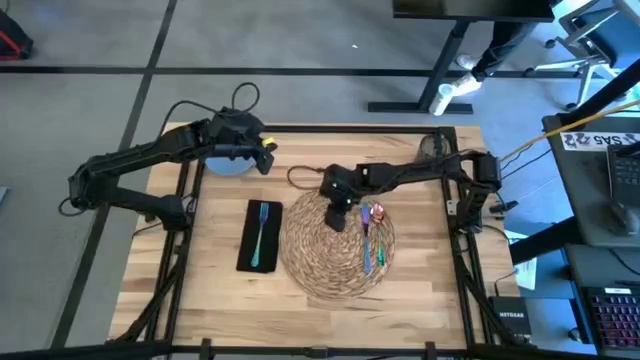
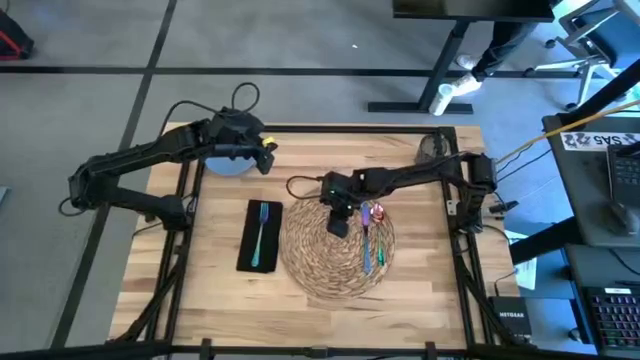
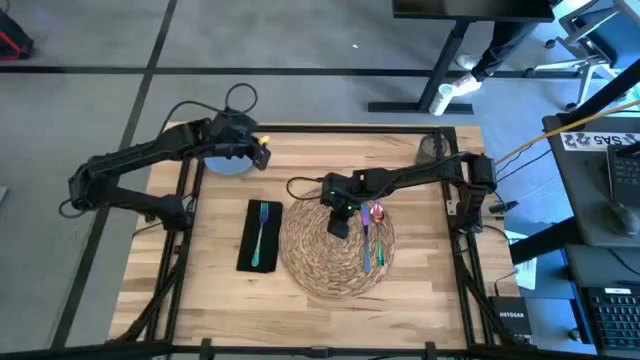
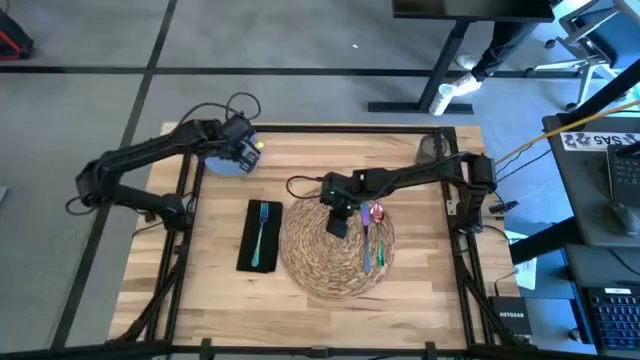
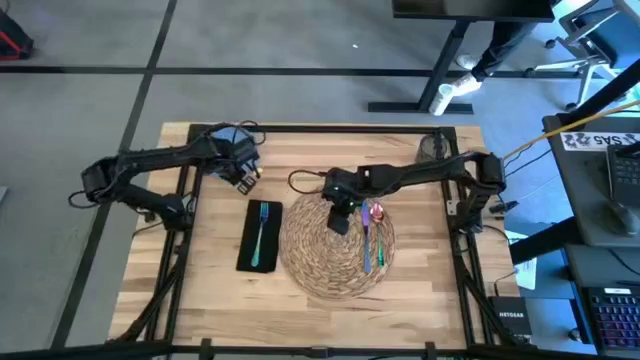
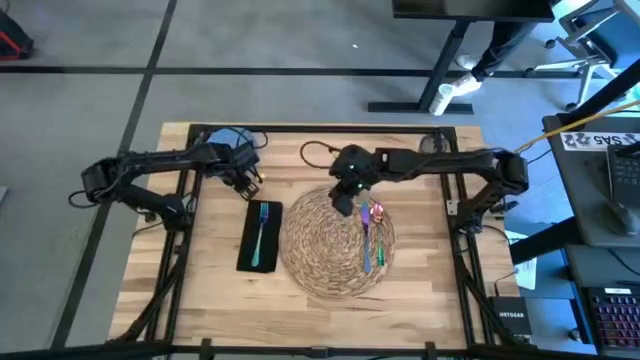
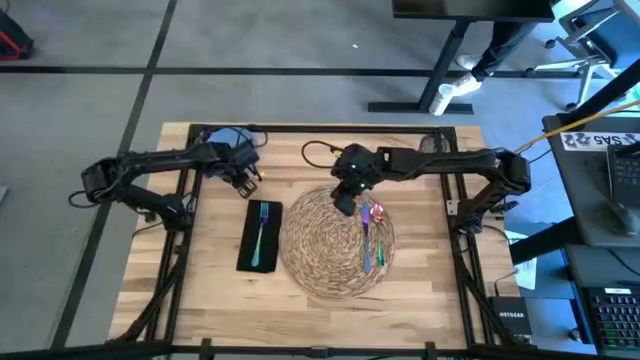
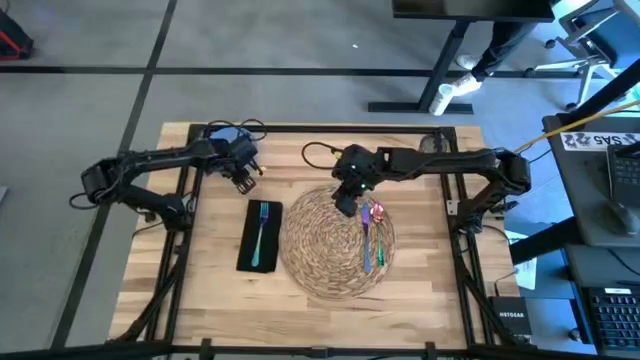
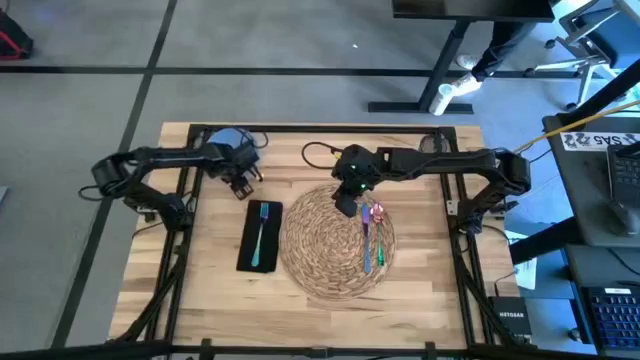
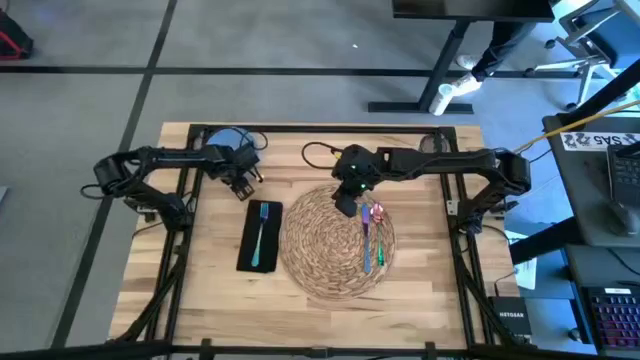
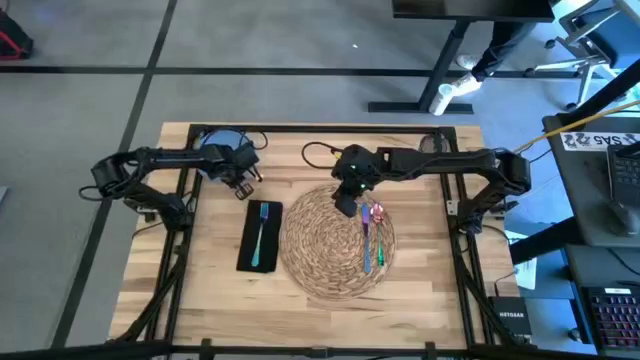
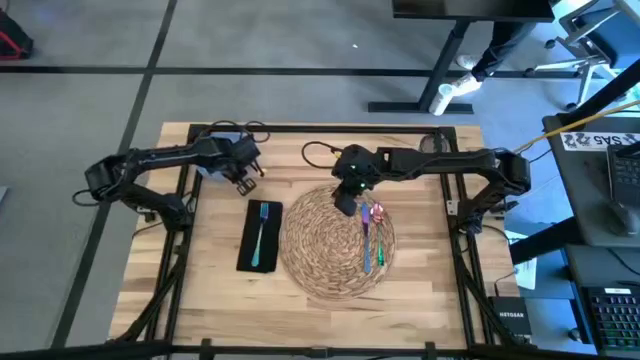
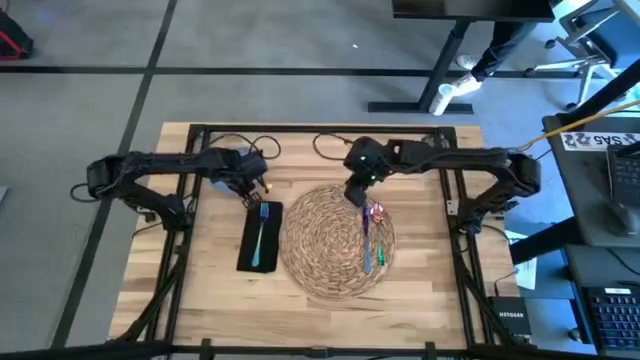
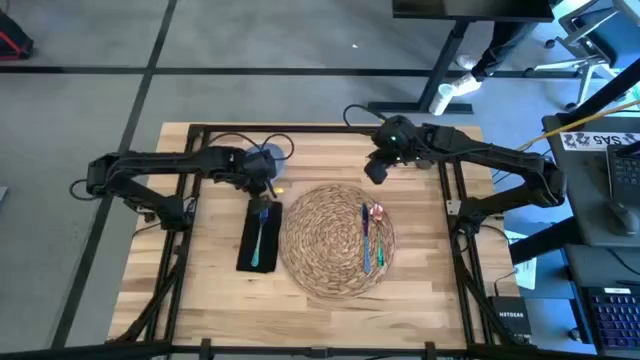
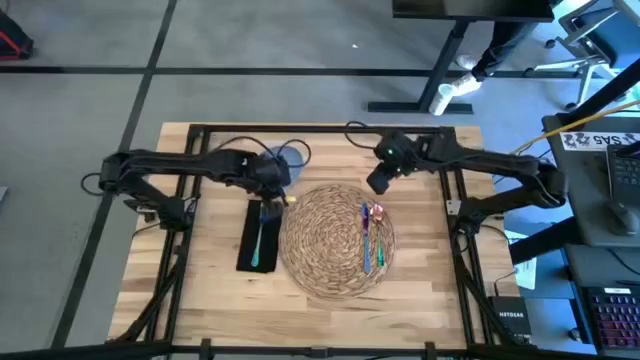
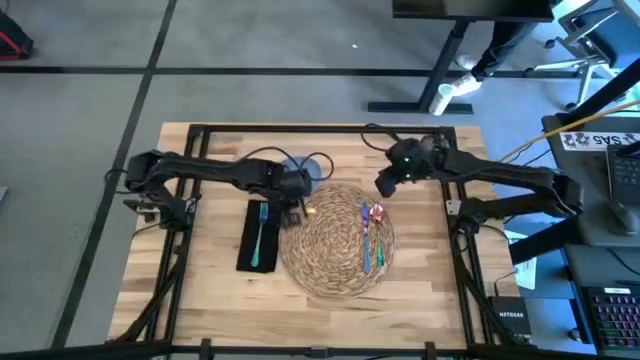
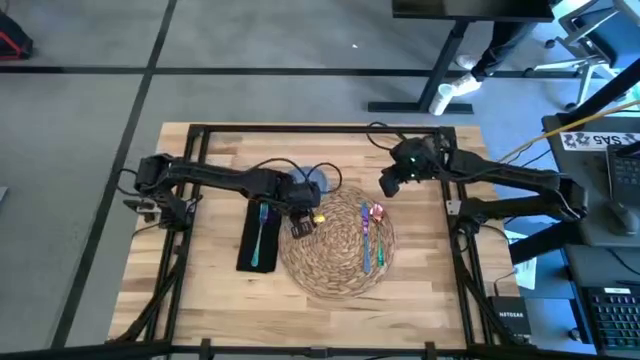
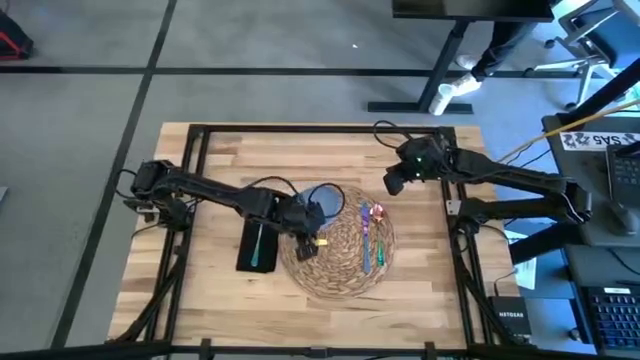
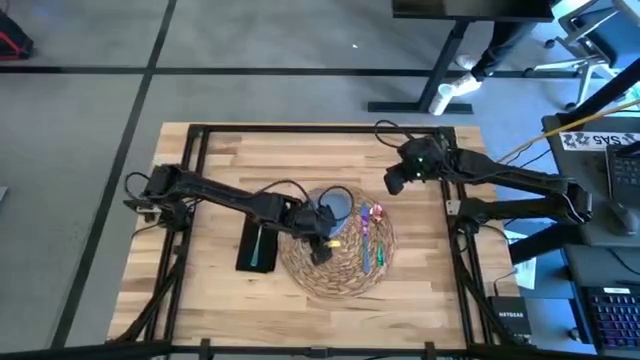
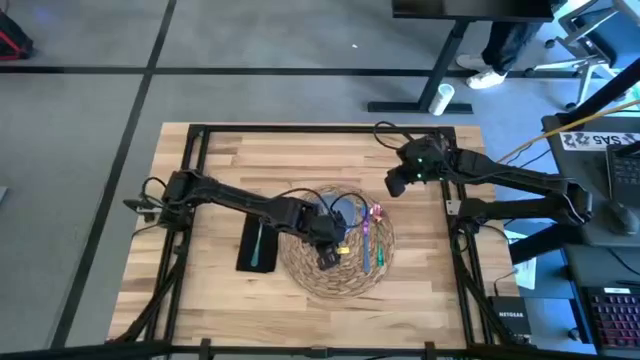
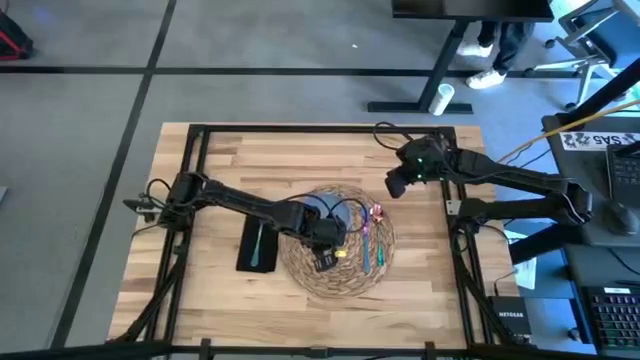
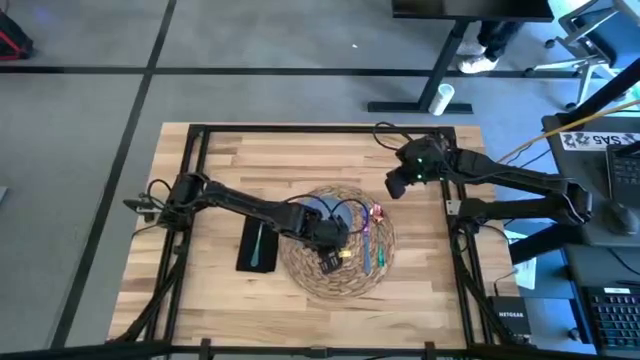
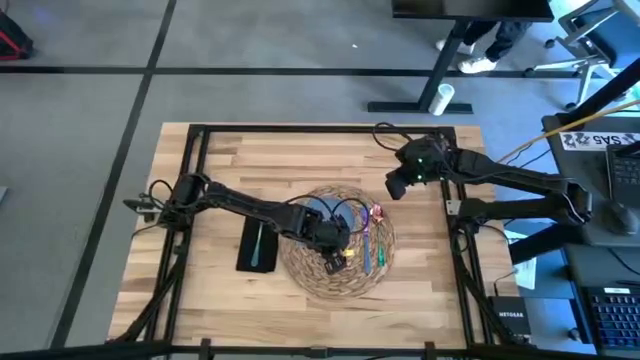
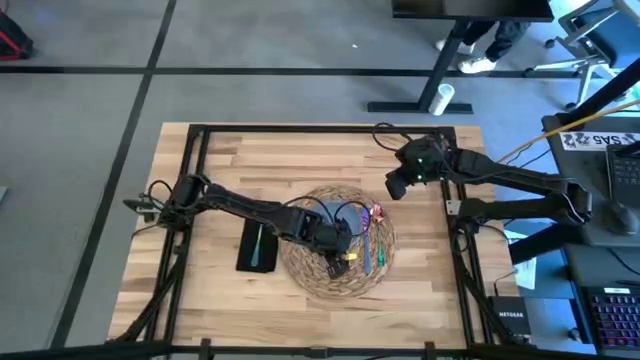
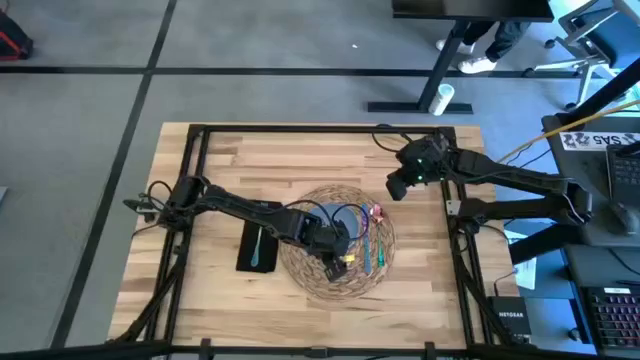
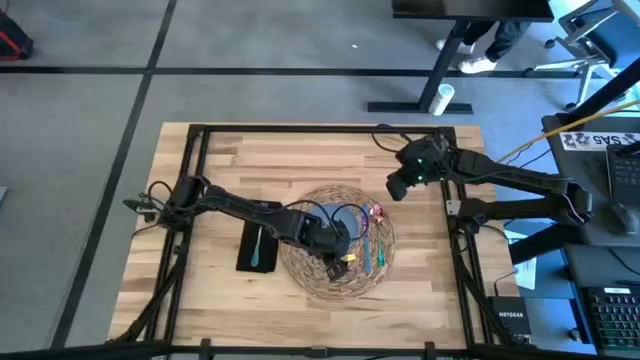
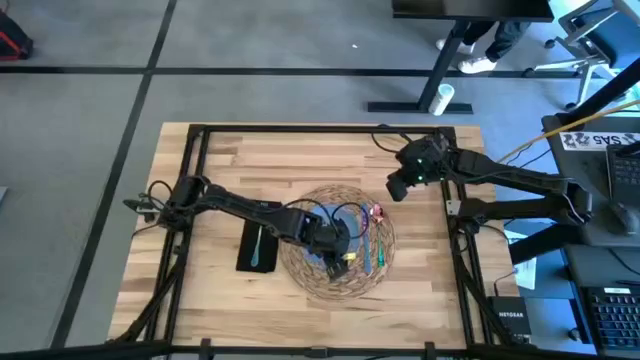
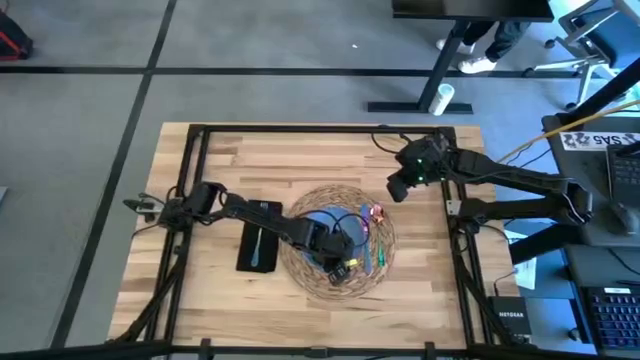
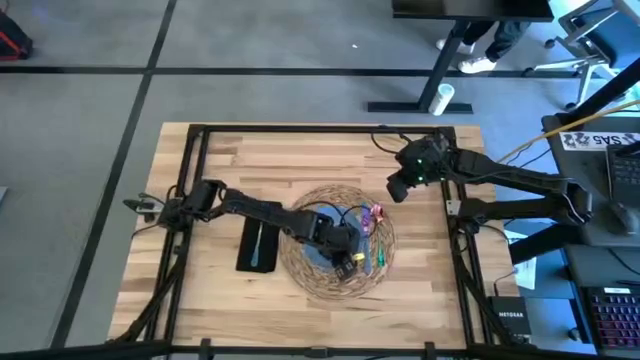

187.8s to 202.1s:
Task: Set table place
Put the blue plate on top of the brown placemat

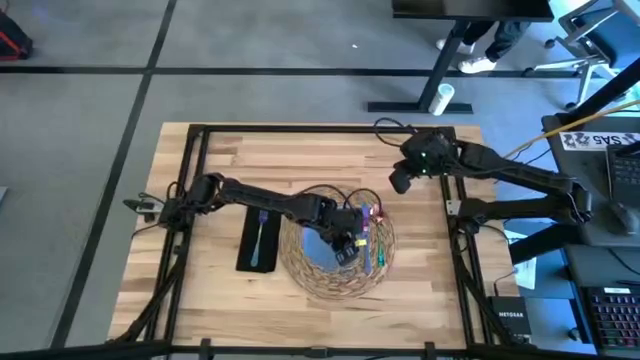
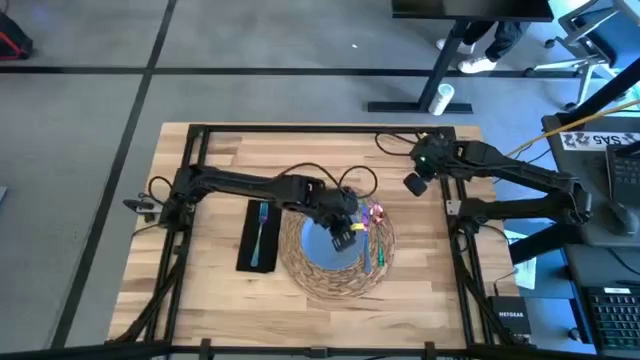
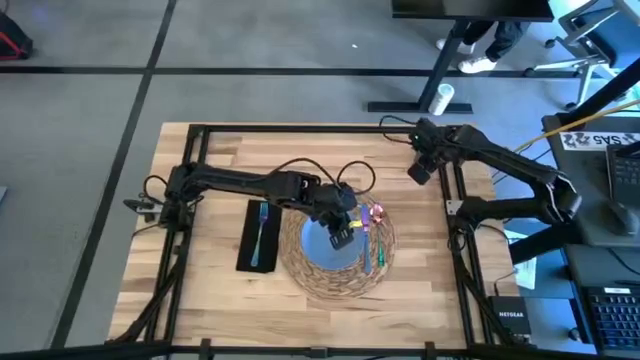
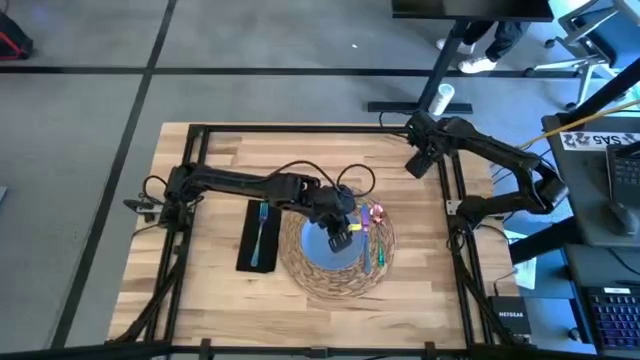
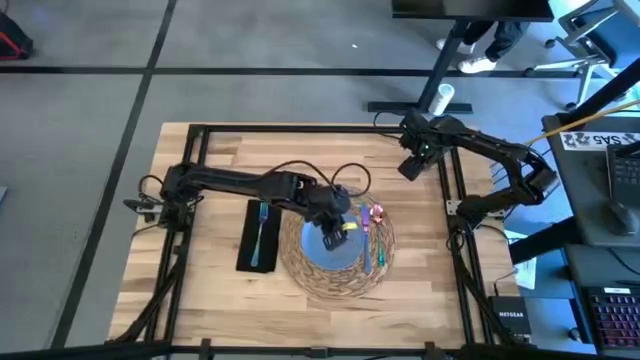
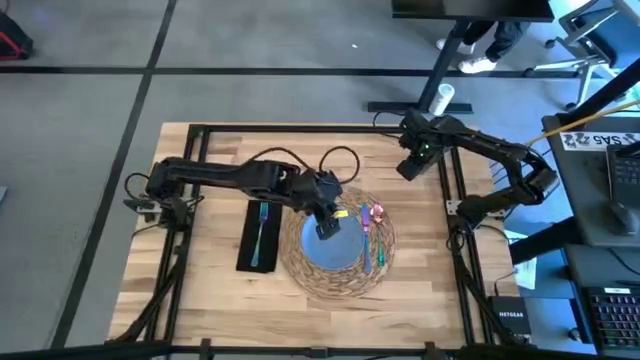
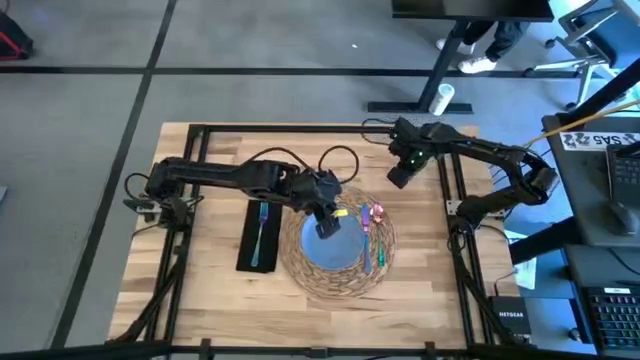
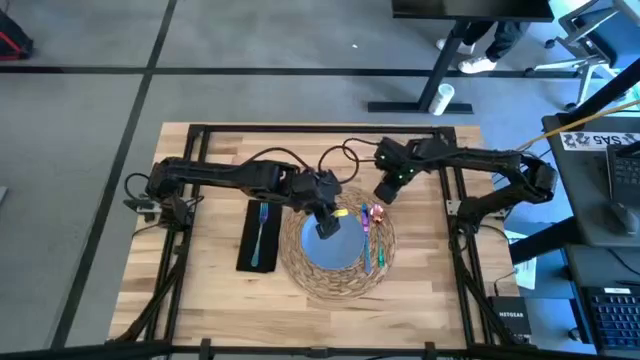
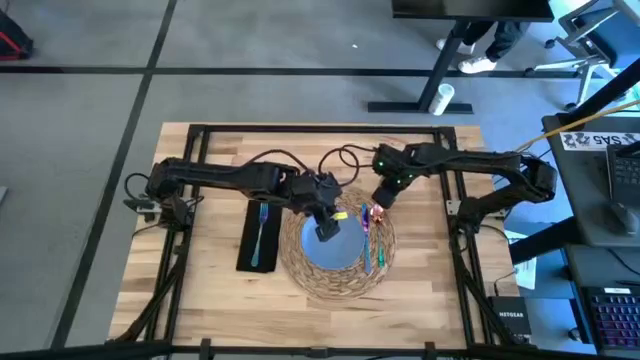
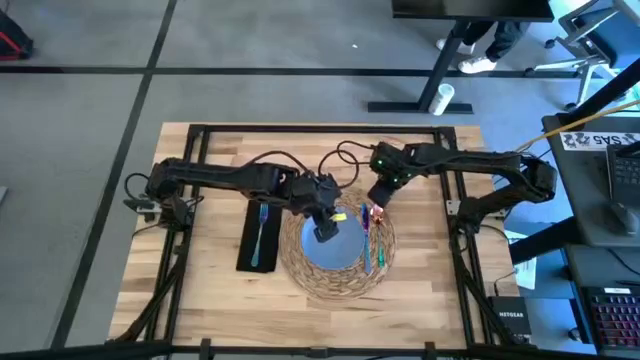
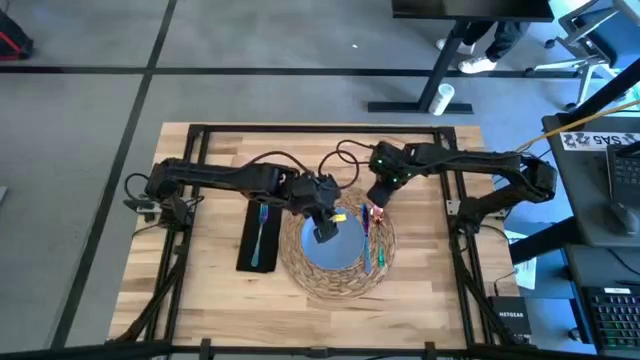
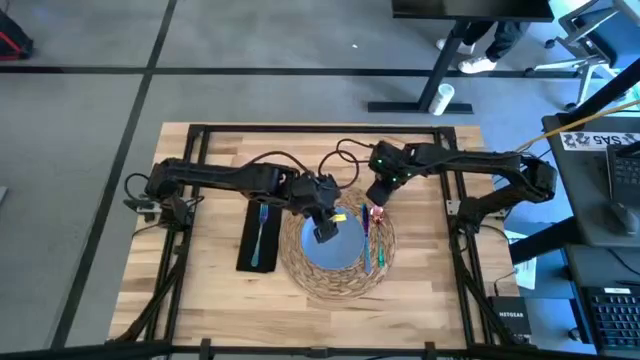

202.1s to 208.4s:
Put the blue cup on the top right of the brown placemat
